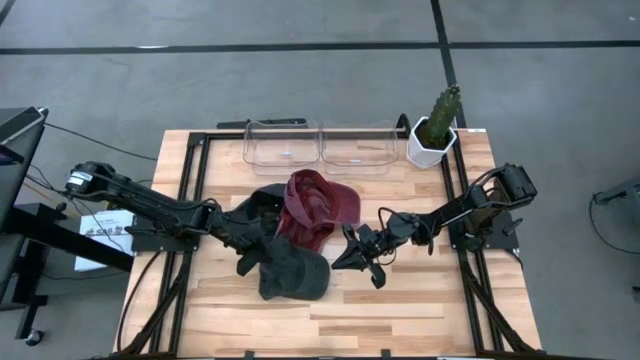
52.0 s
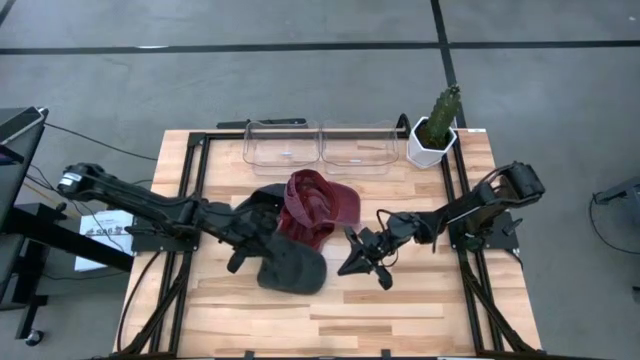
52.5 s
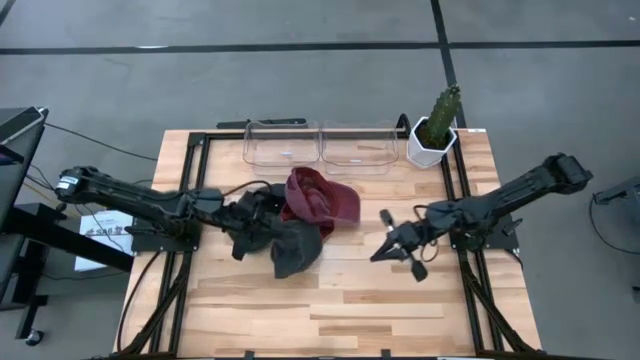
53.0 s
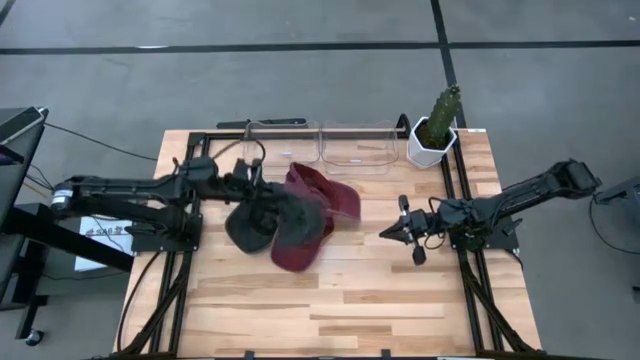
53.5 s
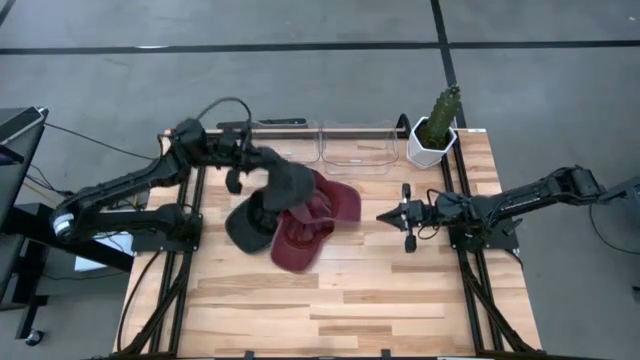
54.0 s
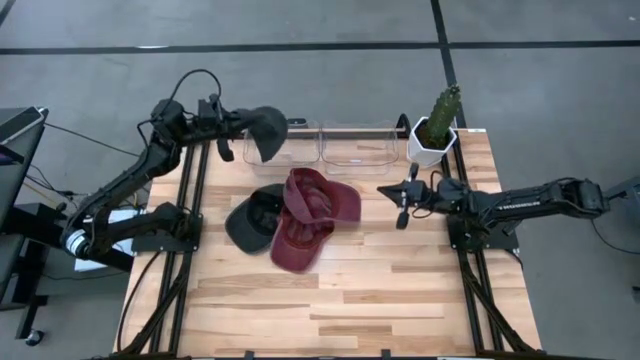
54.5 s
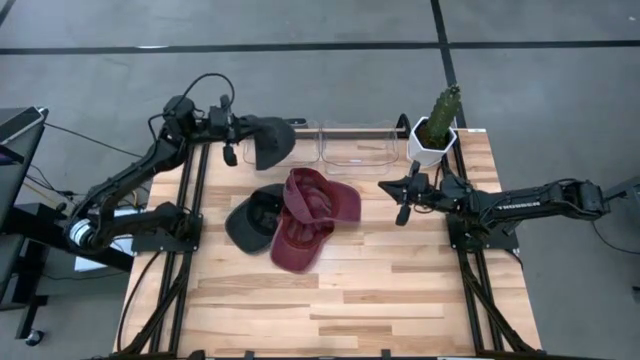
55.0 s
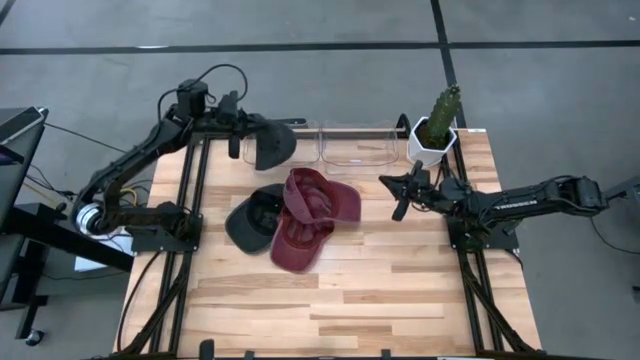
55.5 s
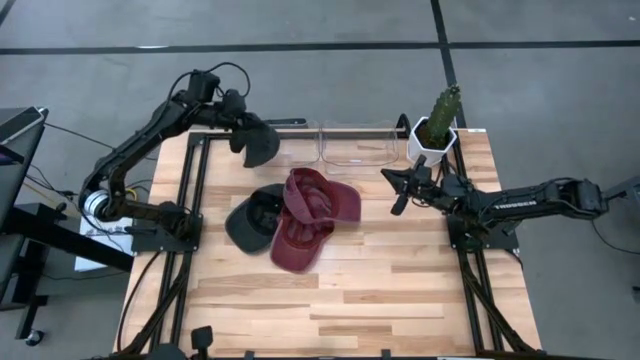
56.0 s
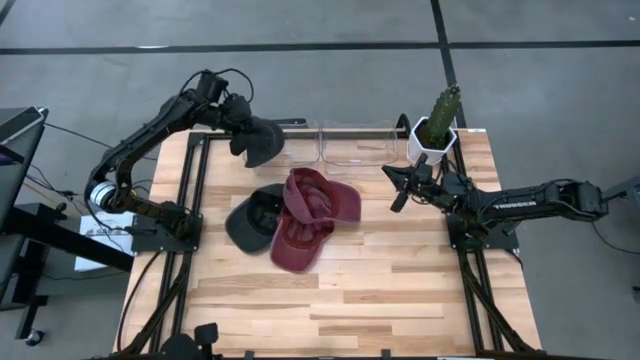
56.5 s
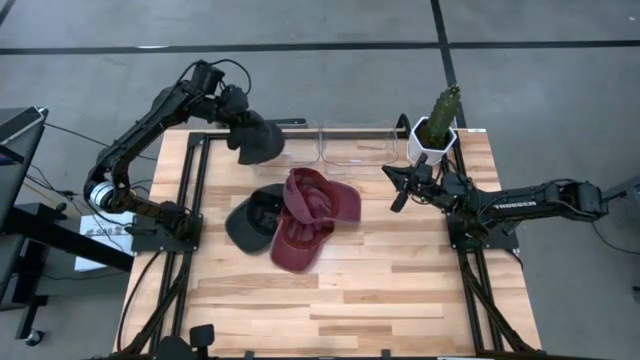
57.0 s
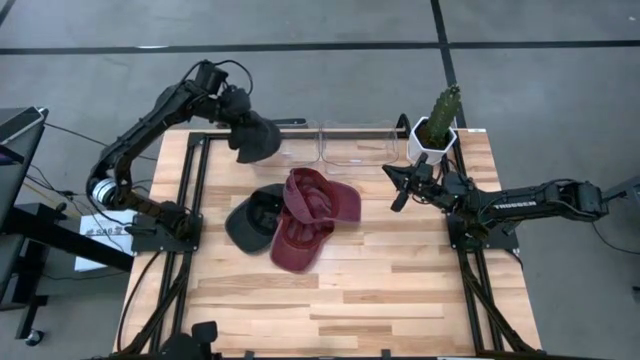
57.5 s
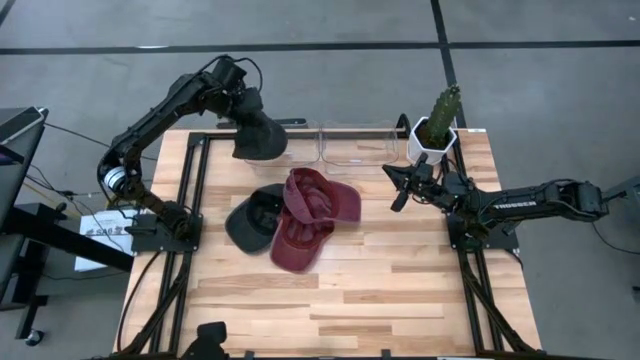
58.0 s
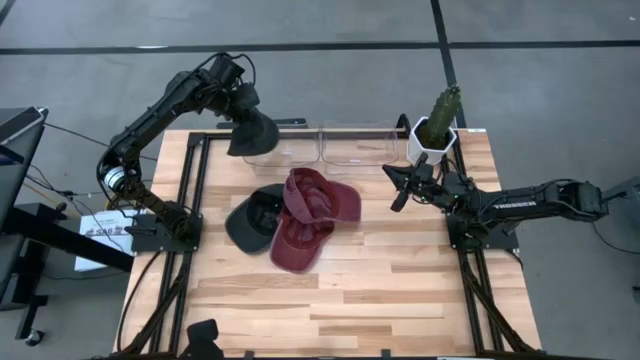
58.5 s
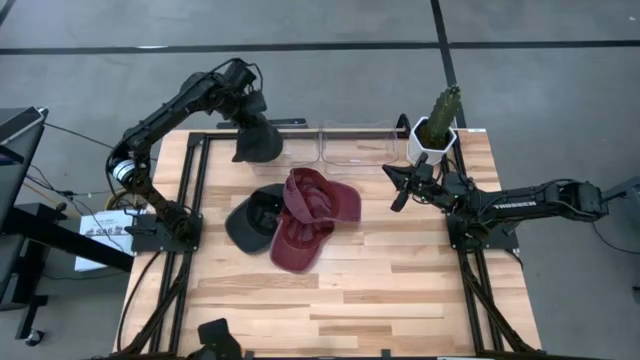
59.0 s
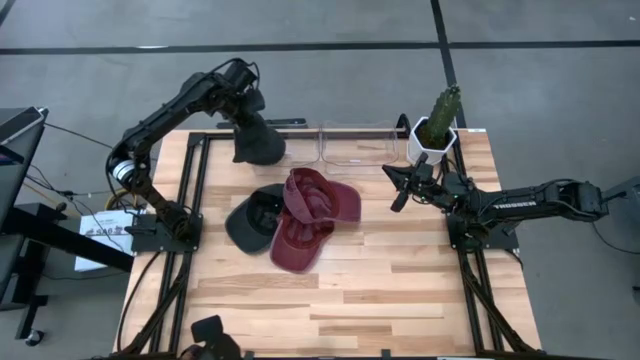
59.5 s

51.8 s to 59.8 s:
Task: Pick & Place hat
Put the right black cap into the left transparent bin

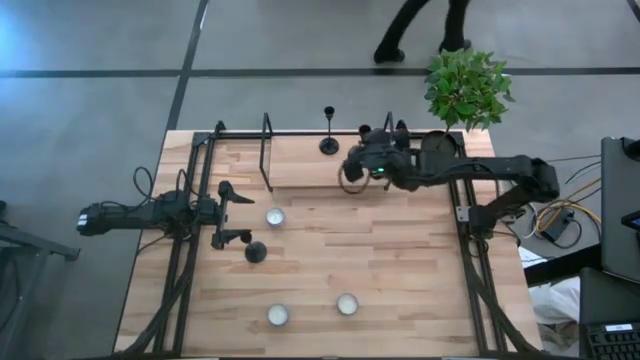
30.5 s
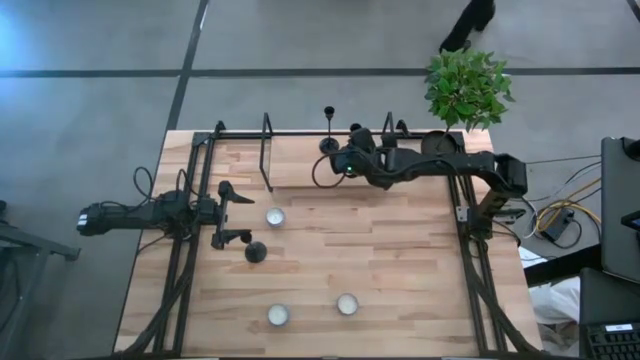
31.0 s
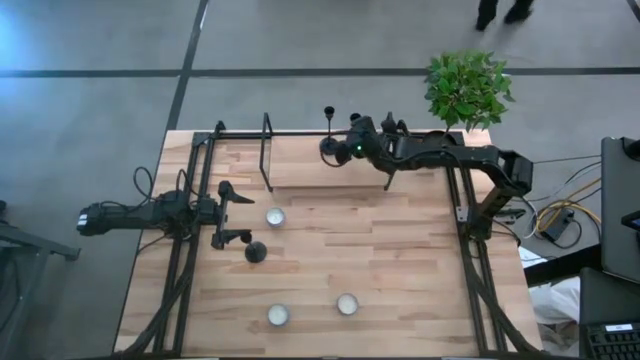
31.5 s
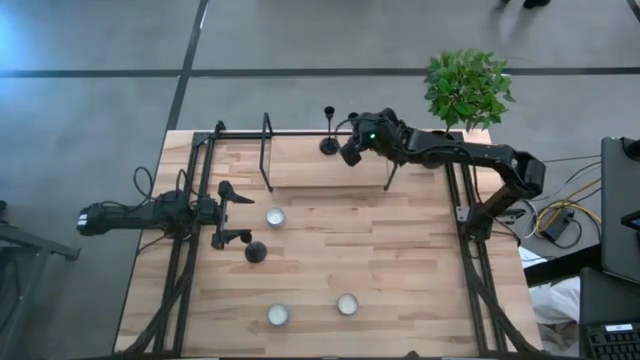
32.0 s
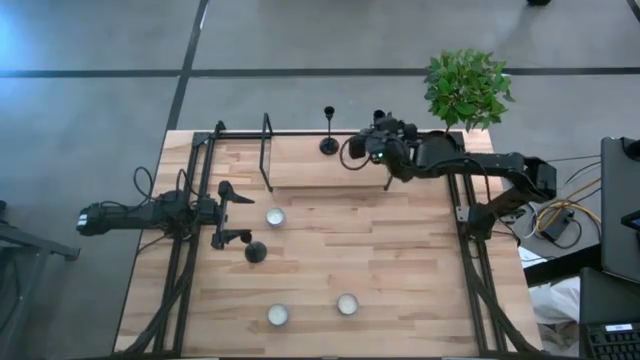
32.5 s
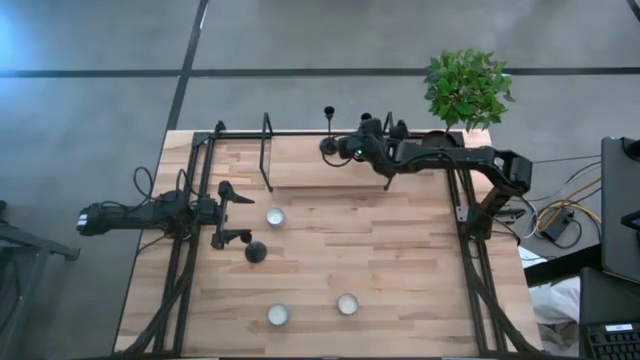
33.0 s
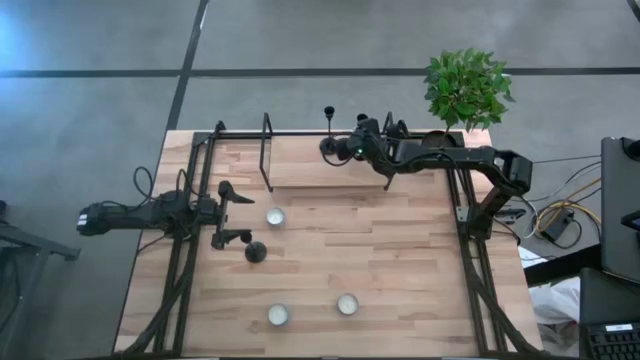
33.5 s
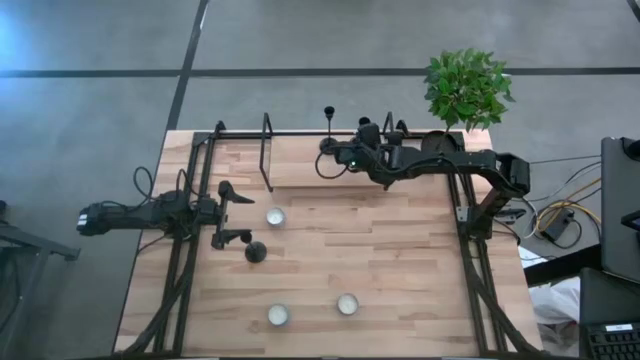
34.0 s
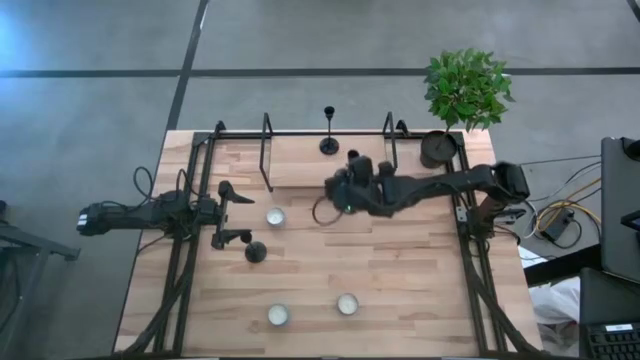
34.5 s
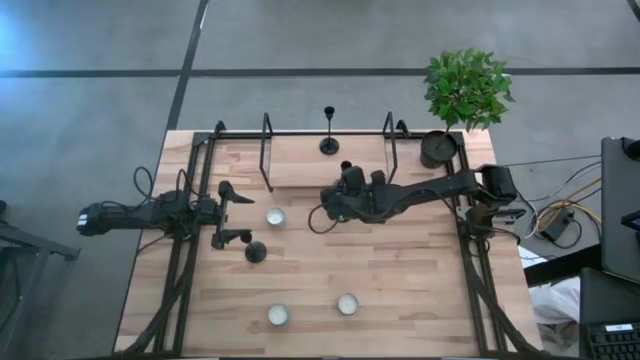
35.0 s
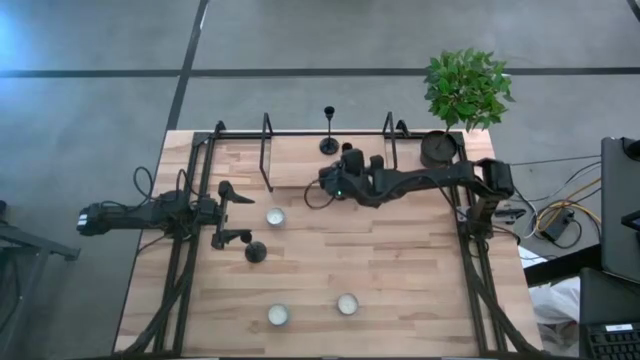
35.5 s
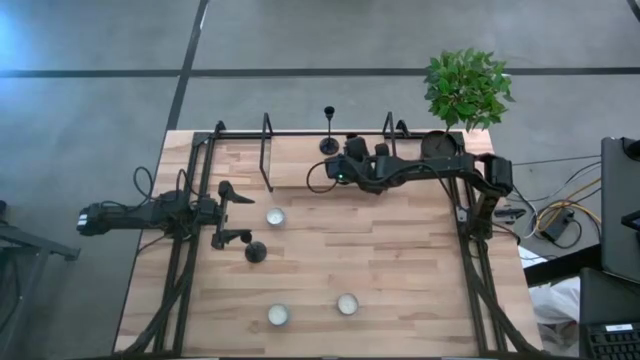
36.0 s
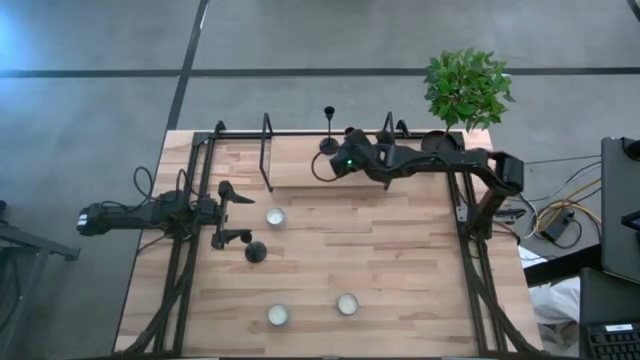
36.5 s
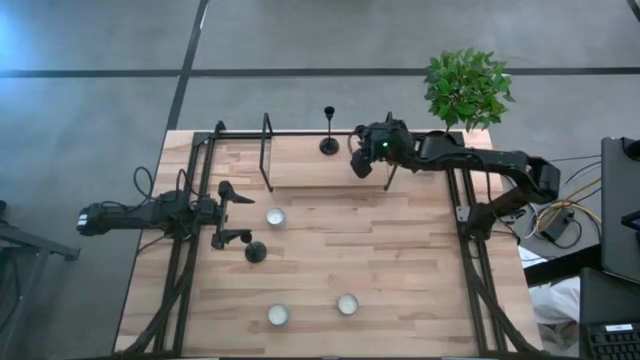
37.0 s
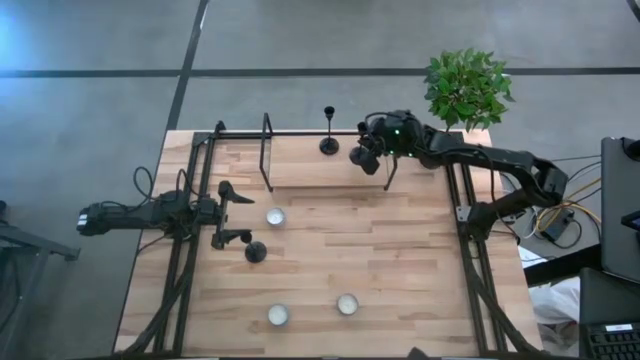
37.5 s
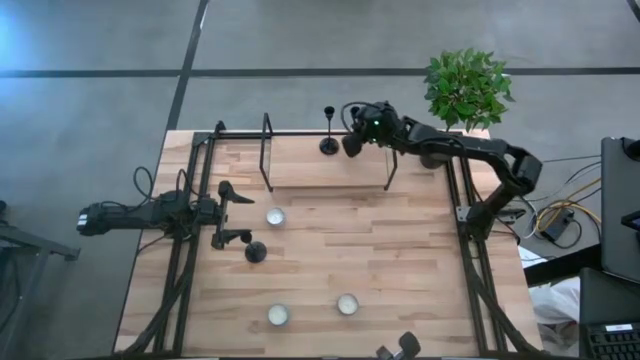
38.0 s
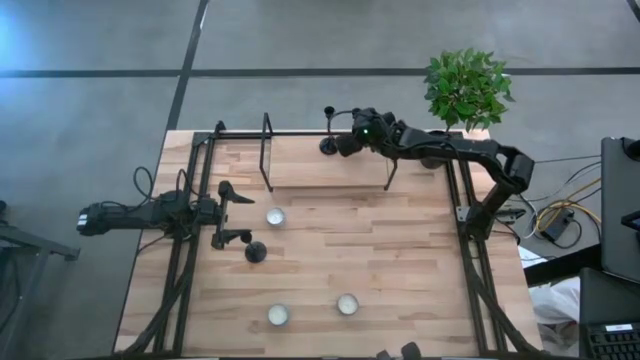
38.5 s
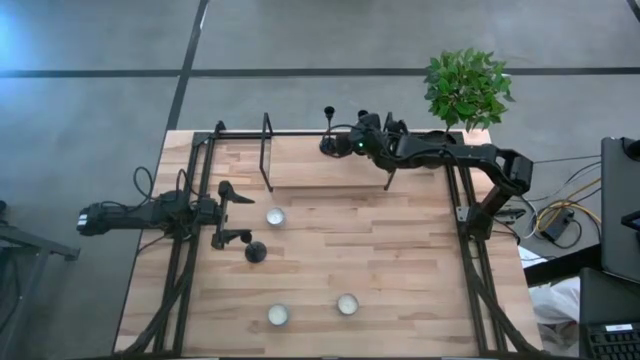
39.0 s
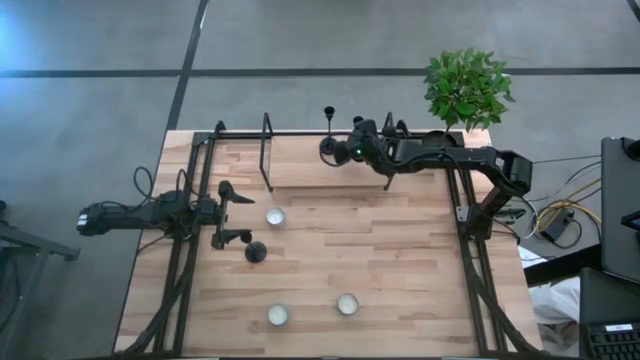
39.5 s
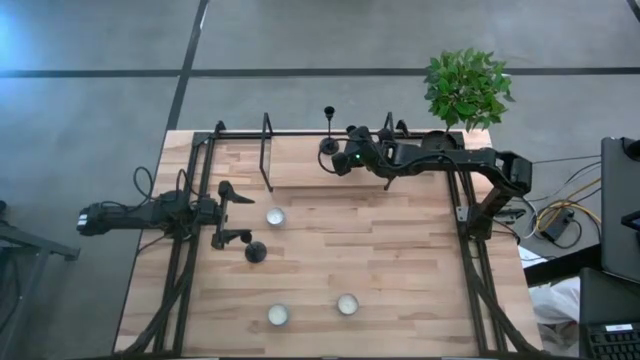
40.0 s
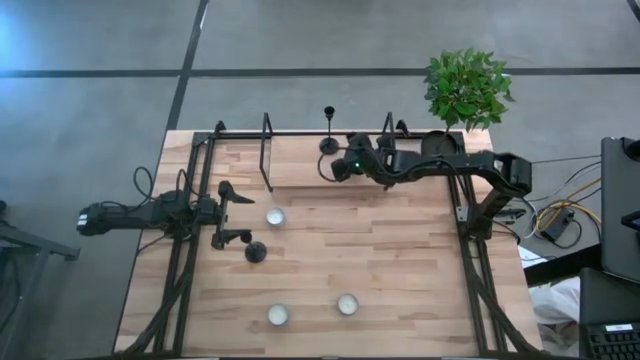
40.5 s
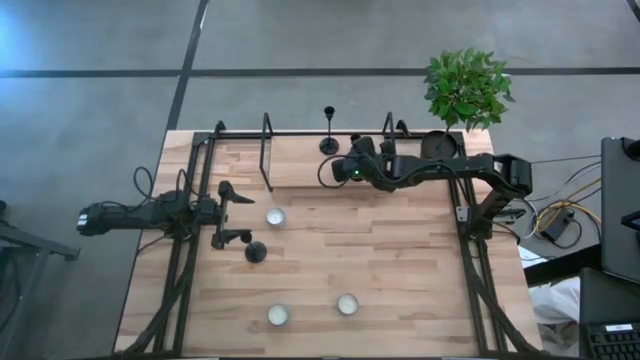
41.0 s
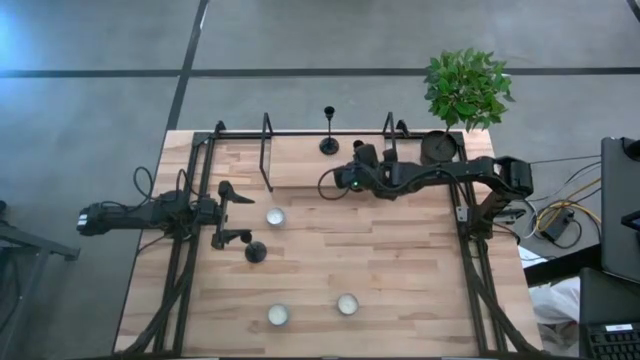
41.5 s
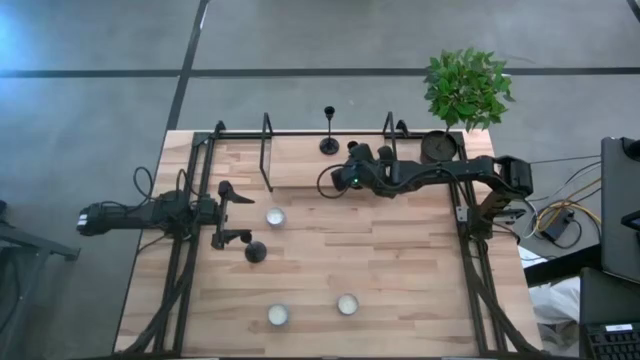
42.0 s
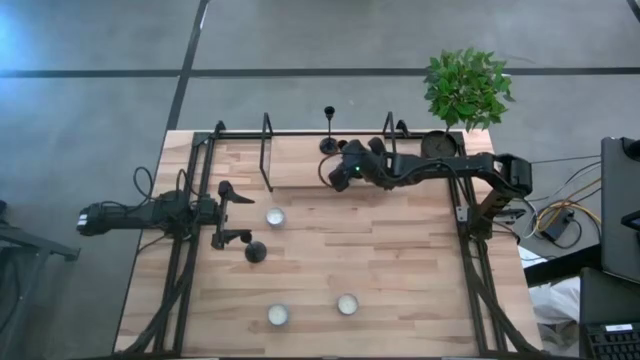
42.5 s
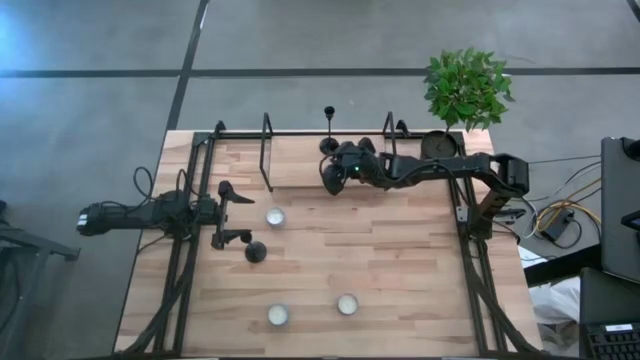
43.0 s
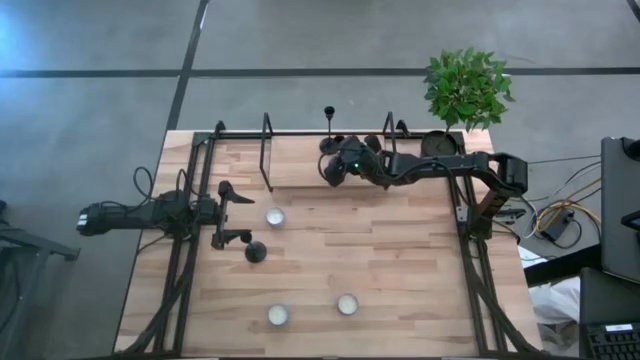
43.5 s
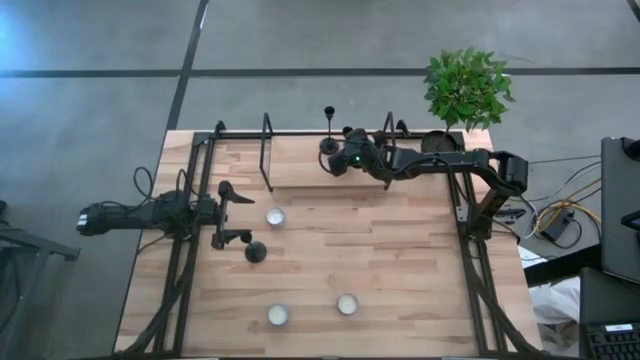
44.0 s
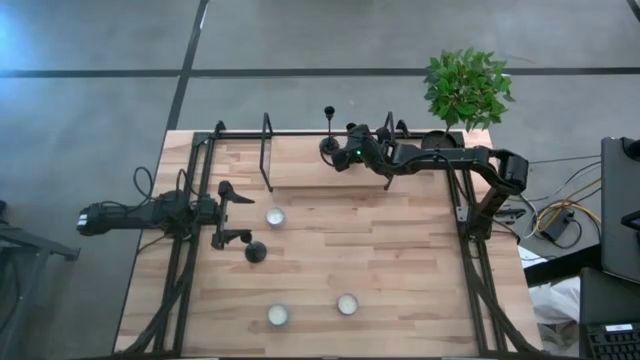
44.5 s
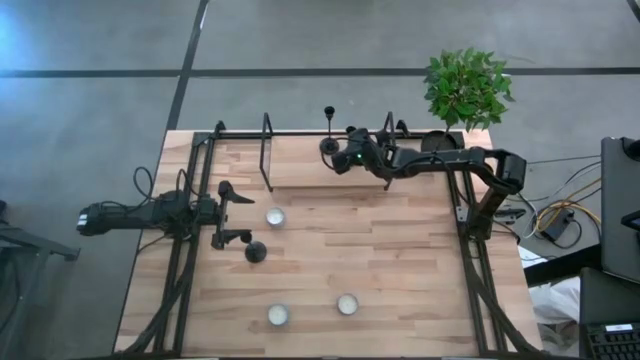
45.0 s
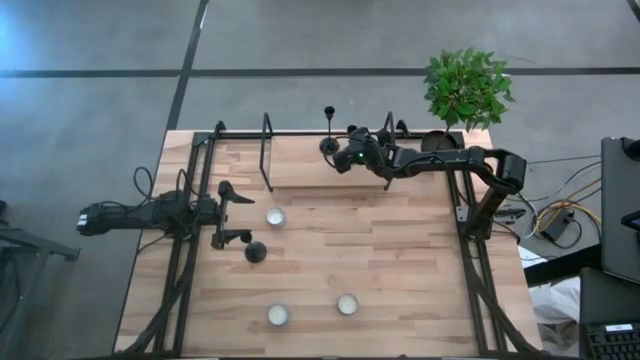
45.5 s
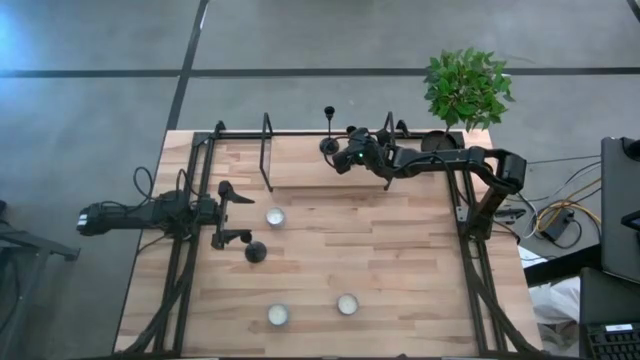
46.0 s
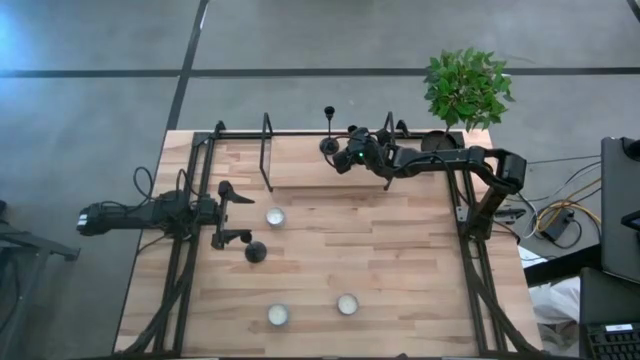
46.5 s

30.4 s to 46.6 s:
Task: Pick & Place candle stick holders
Put the right black candle holder on the shelf
